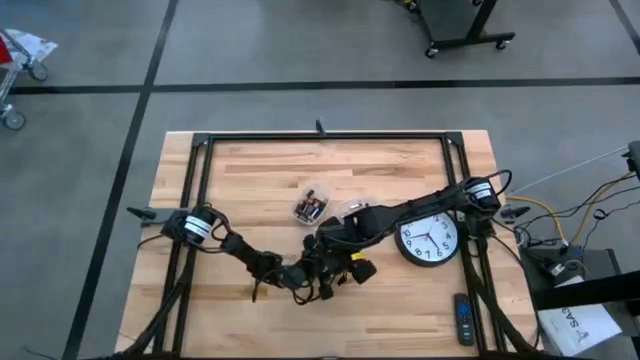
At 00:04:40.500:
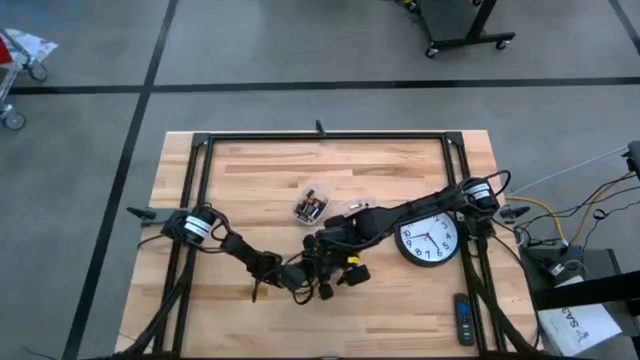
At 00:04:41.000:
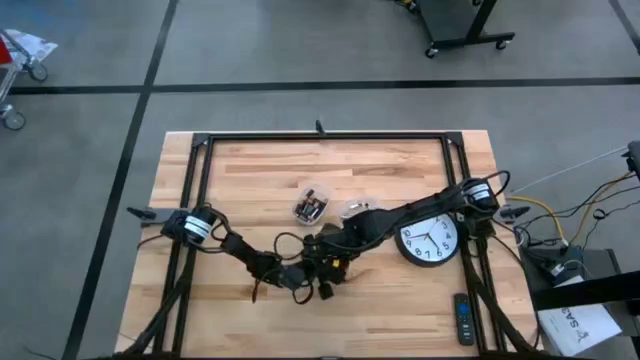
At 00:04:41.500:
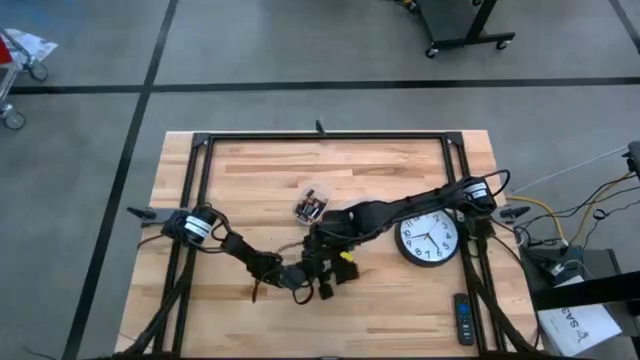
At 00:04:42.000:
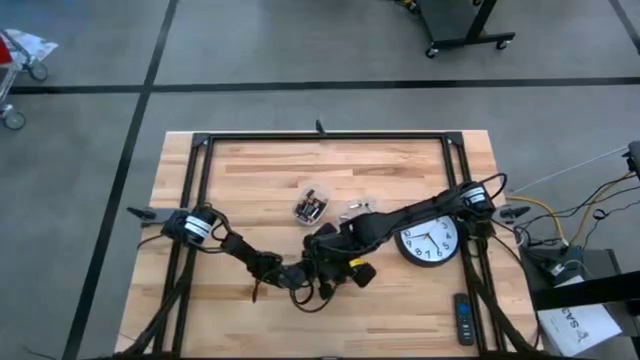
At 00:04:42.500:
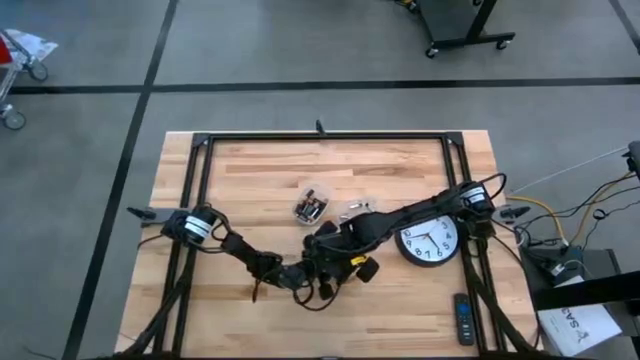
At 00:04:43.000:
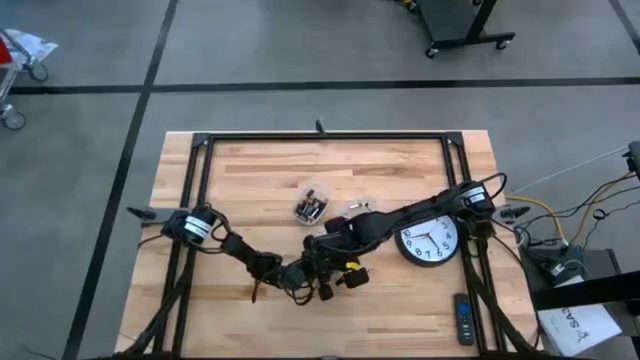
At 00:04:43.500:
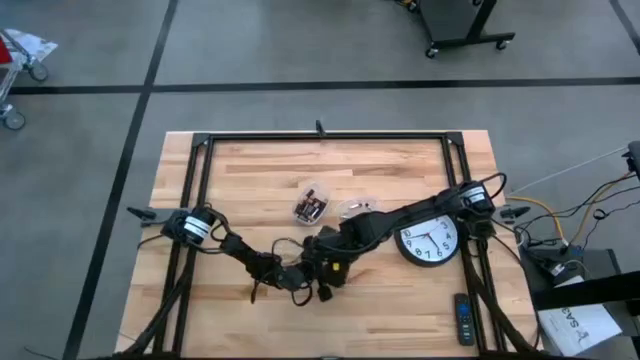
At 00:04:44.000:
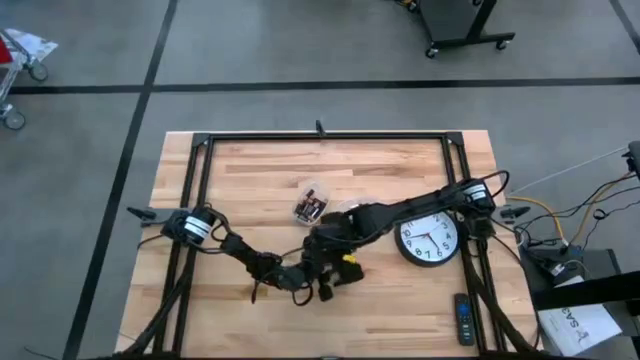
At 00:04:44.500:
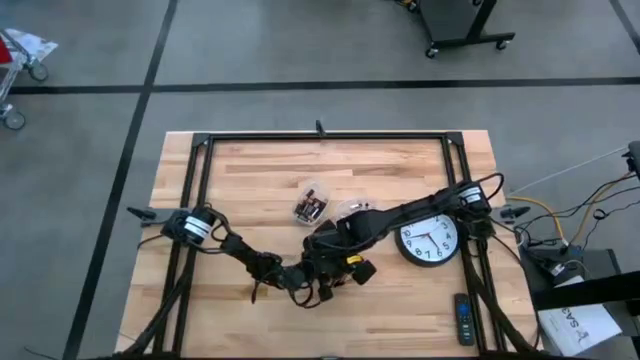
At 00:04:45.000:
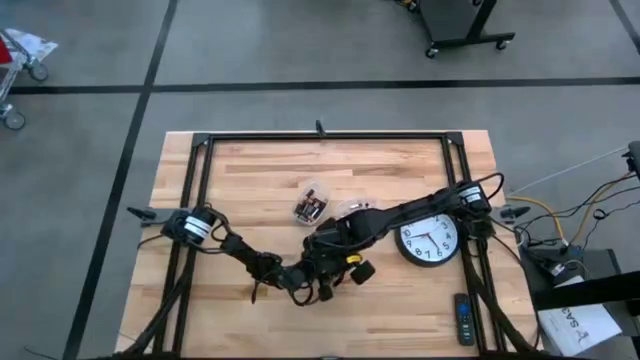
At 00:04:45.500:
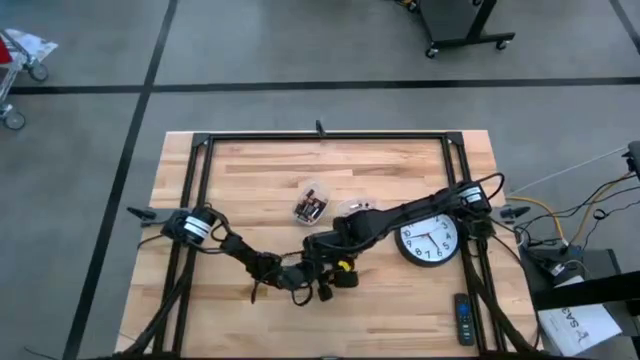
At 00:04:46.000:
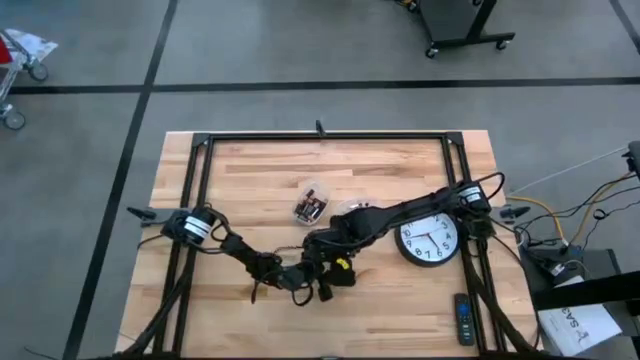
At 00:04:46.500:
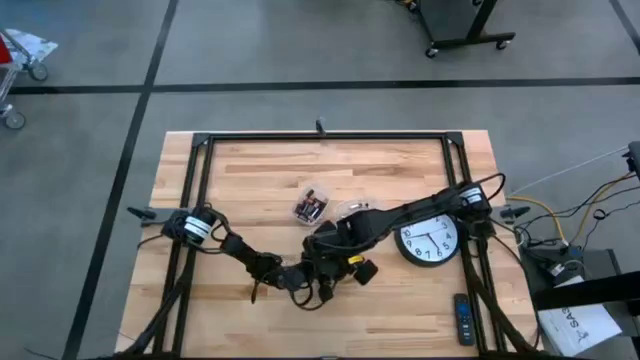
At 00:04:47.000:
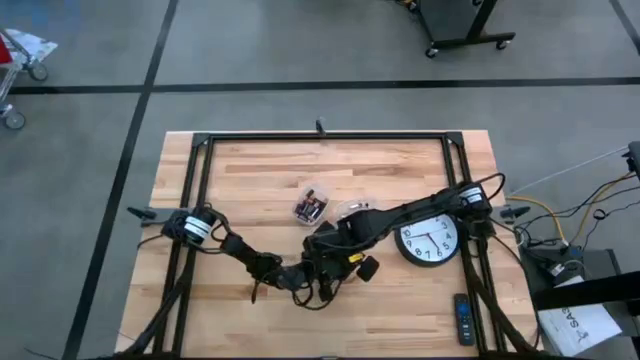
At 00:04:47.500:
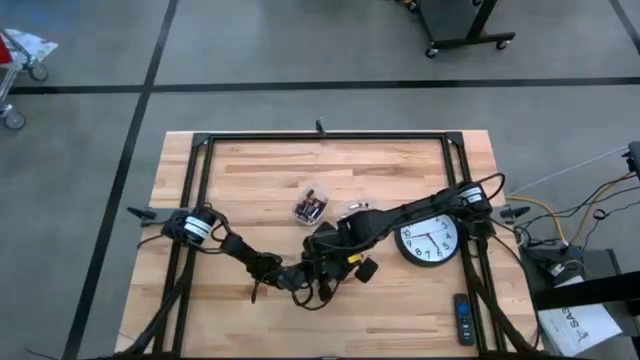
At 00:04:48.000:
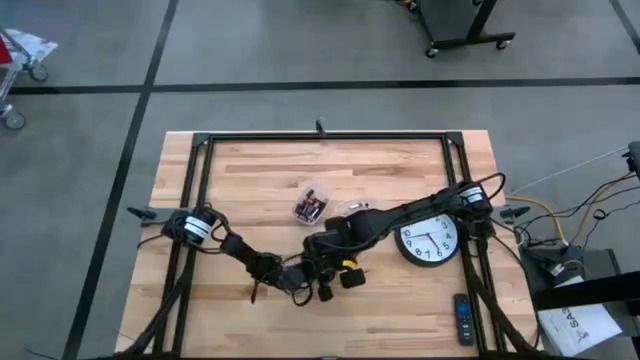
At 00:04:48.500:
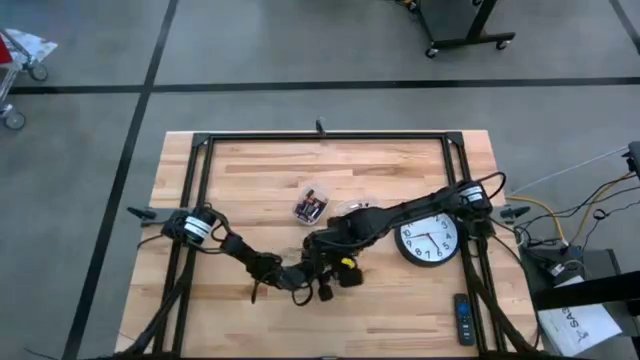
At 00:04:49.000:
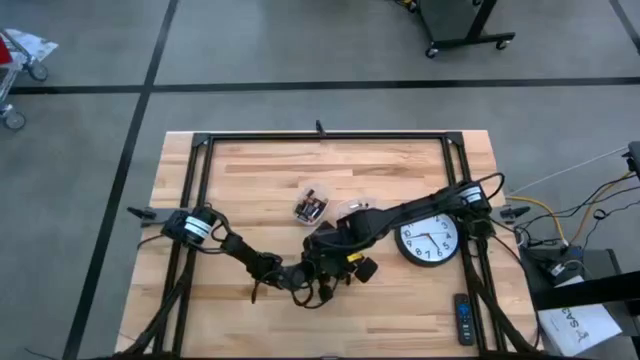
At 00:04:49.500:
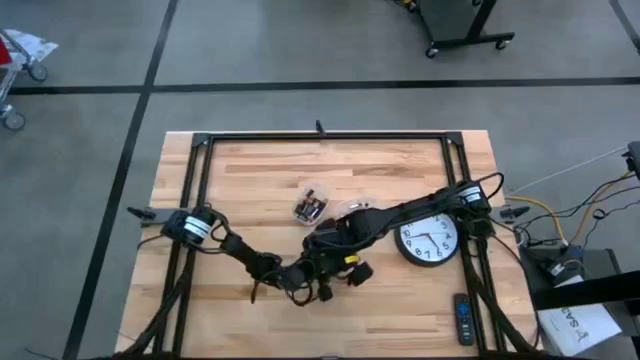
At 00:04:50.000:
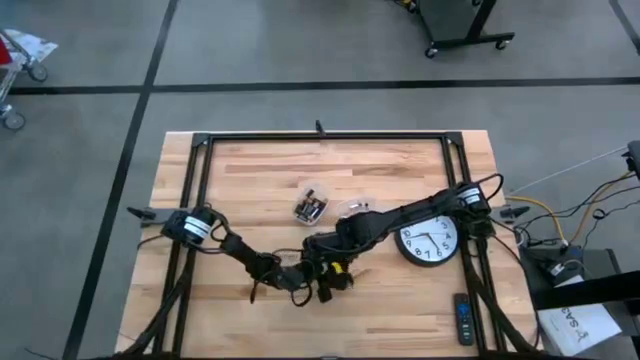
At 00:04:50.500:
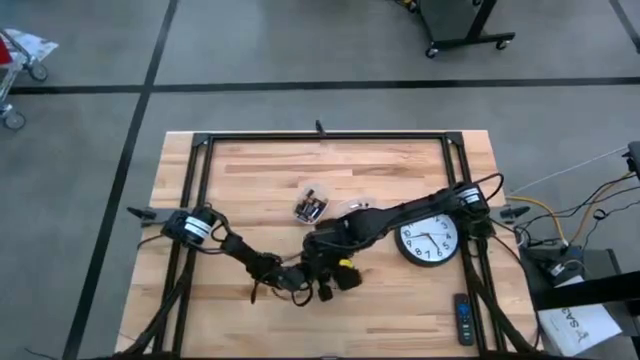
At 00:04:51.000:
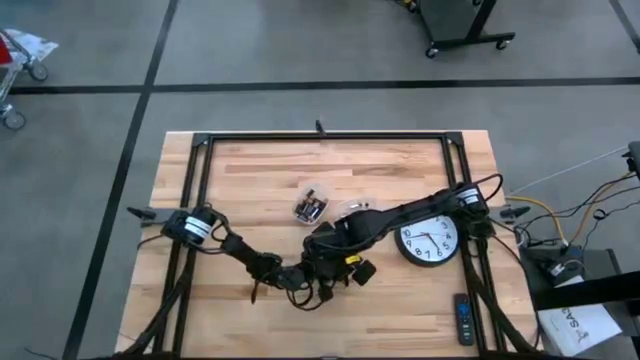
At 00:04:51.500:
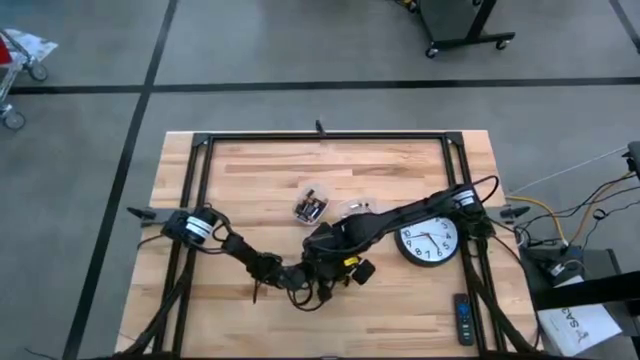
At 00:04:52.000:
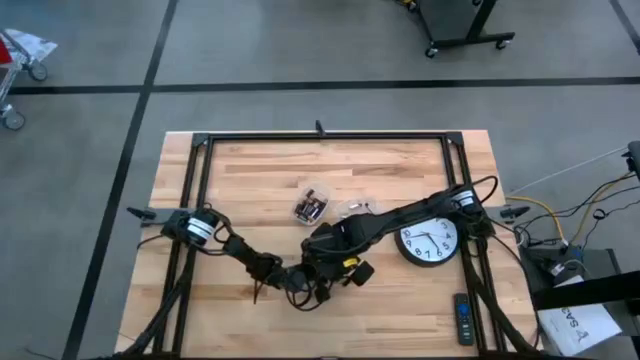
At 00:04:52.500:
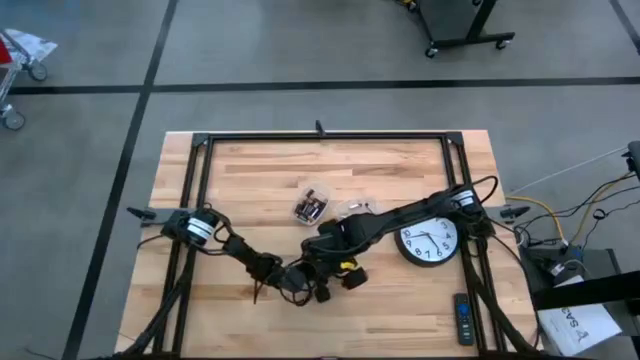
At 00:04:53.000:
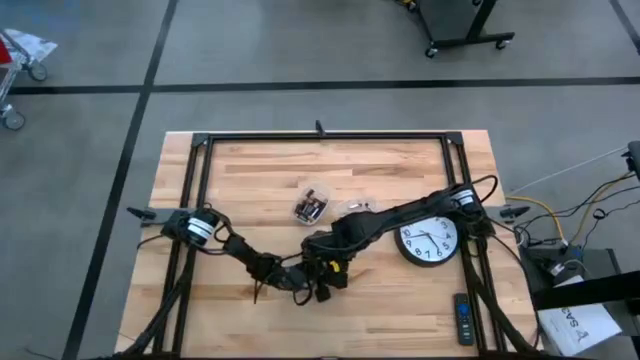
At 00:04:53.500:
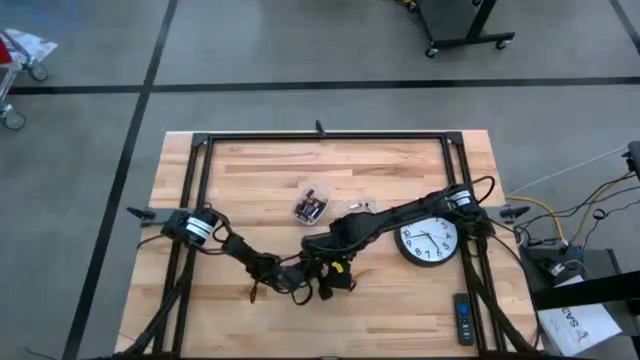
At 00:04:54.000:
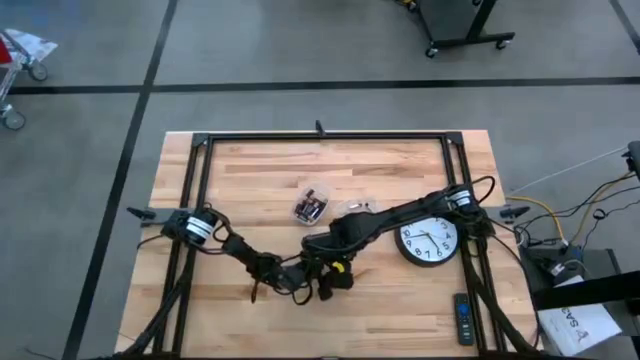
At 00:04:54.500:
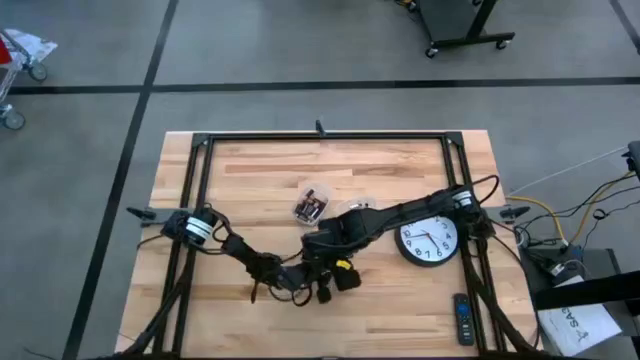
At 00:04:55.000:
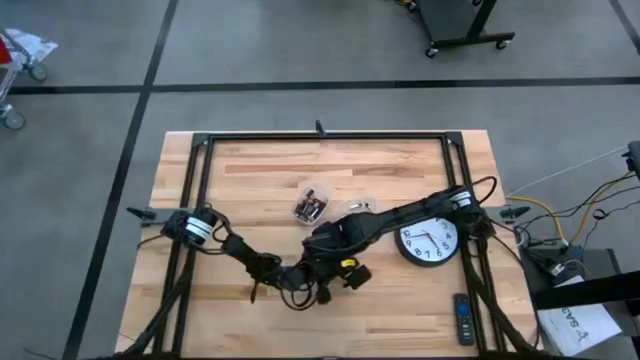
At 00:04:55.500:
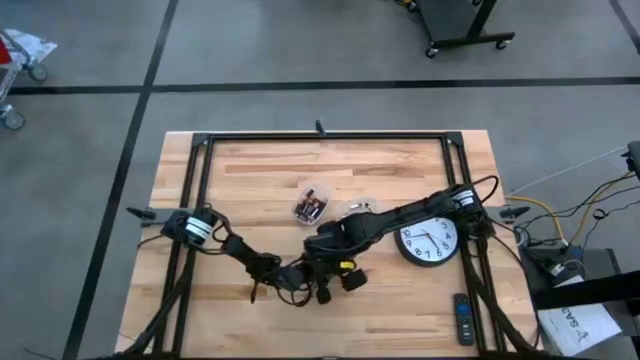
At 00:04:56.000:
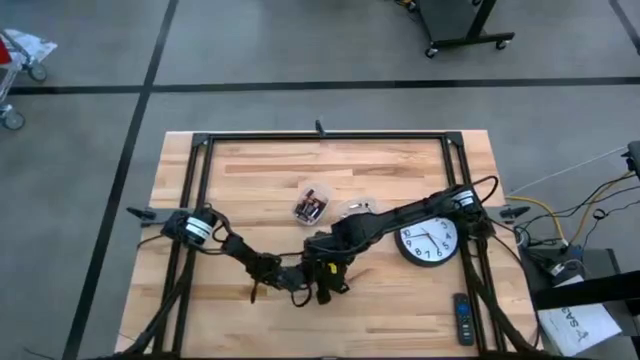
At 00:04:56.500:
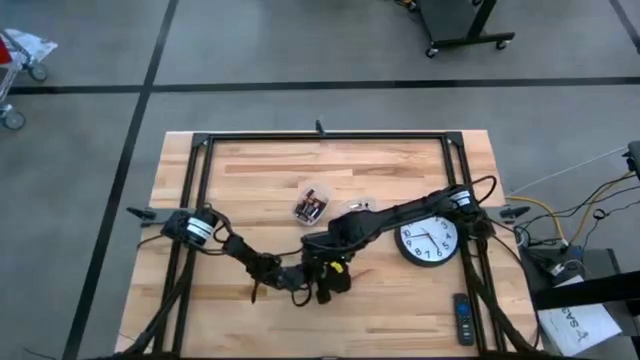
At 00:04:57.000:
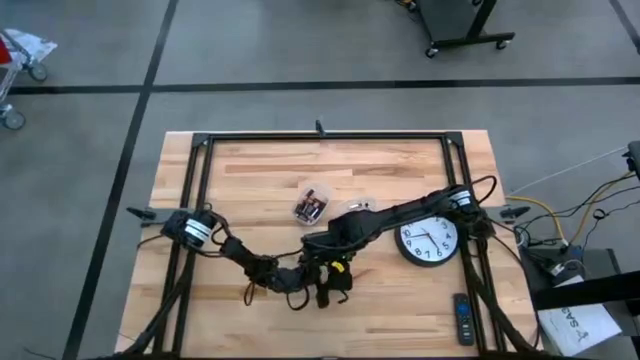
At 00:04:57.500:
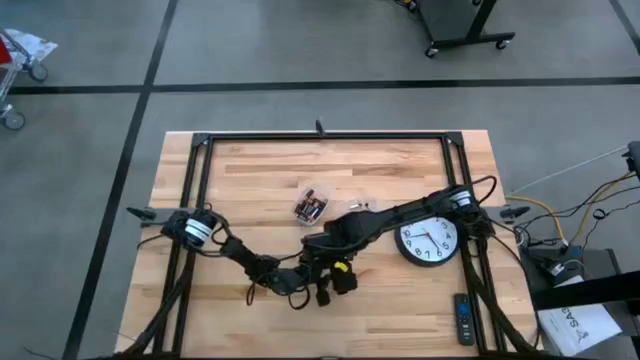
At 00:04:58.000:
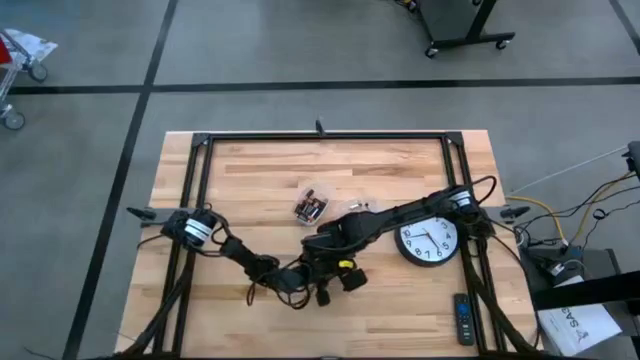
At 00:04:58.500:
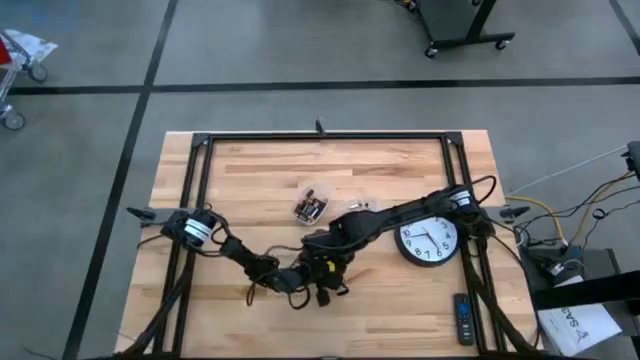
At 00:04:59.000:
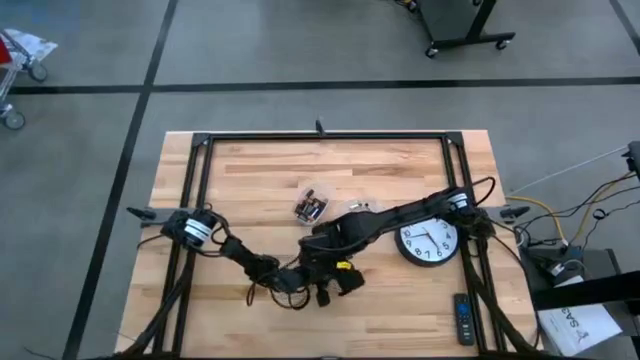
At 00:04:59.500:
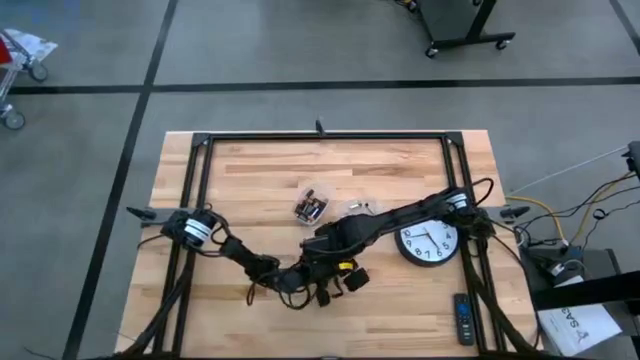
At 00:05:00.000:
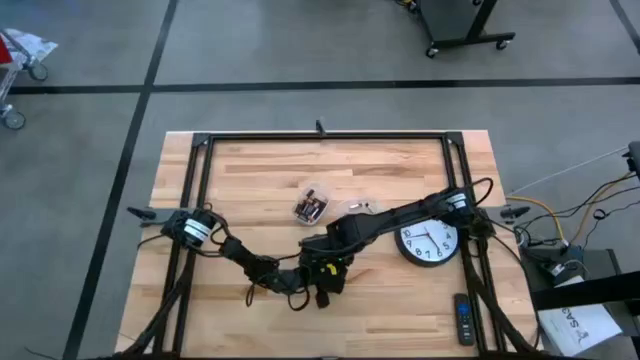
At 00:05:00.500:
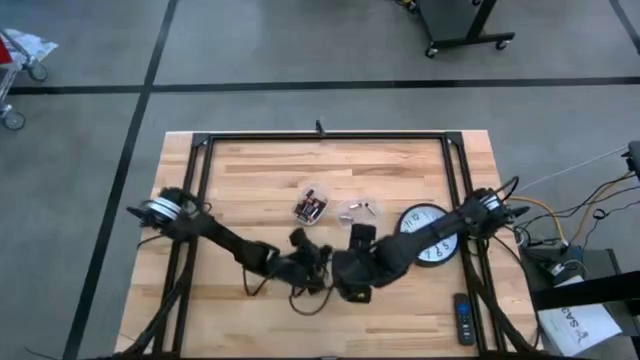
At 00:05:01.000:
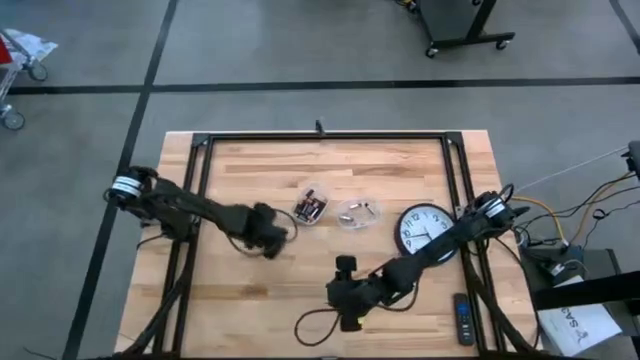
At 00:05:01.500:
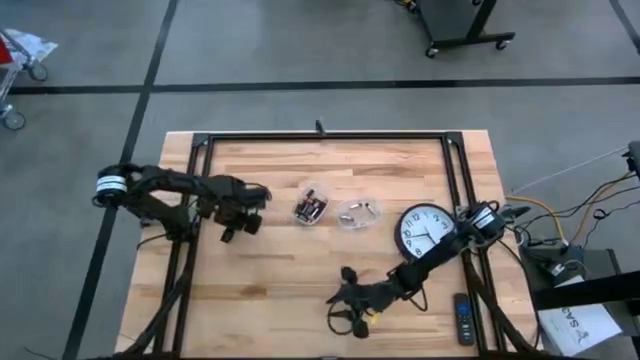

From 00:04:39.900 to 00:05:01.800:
Task: Insert battery
Close the black flashlight cover
